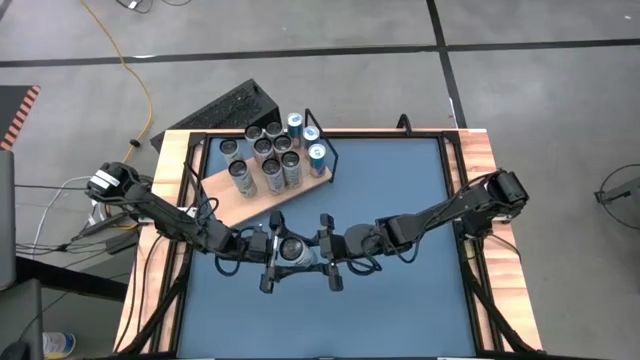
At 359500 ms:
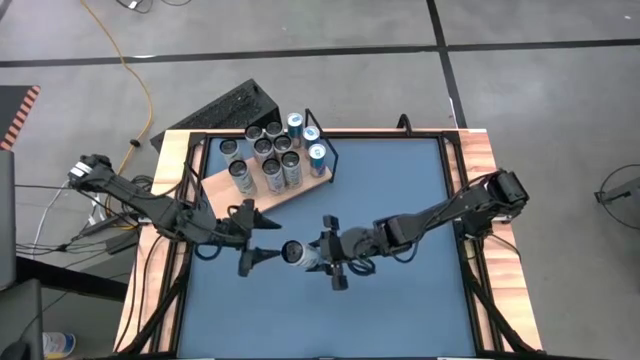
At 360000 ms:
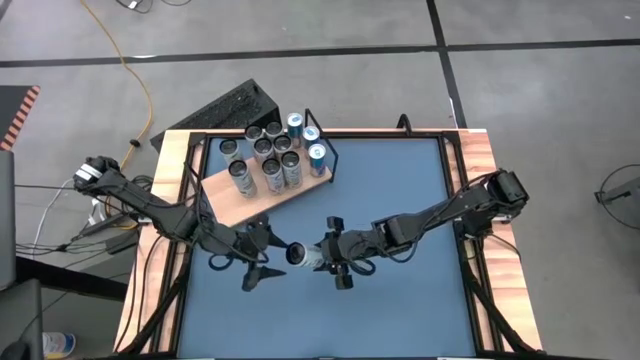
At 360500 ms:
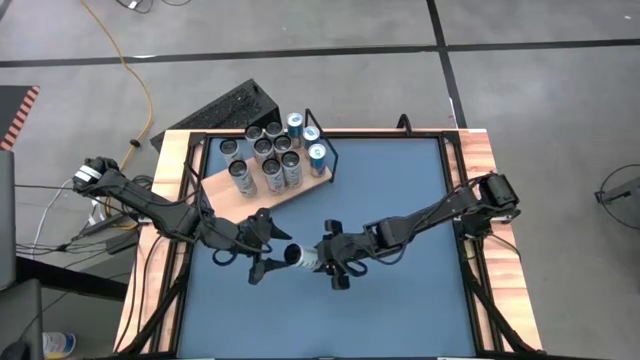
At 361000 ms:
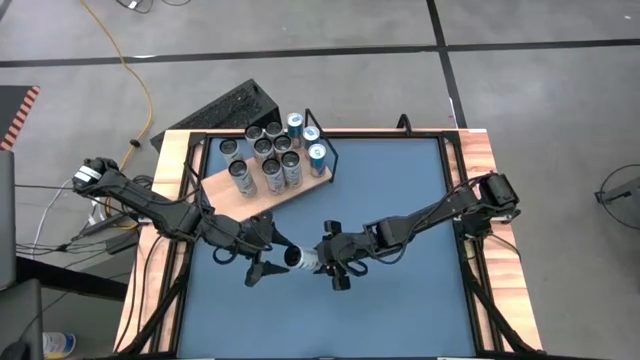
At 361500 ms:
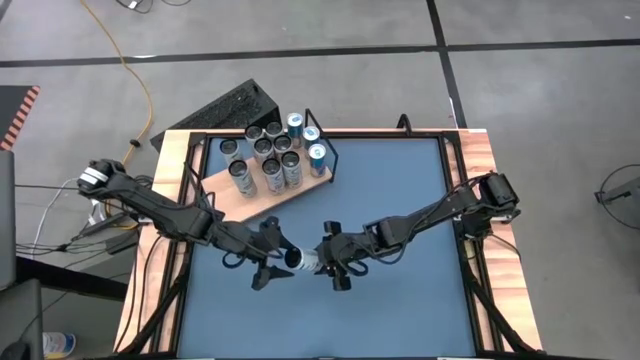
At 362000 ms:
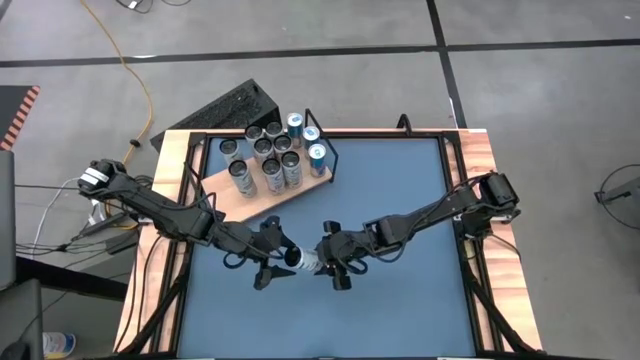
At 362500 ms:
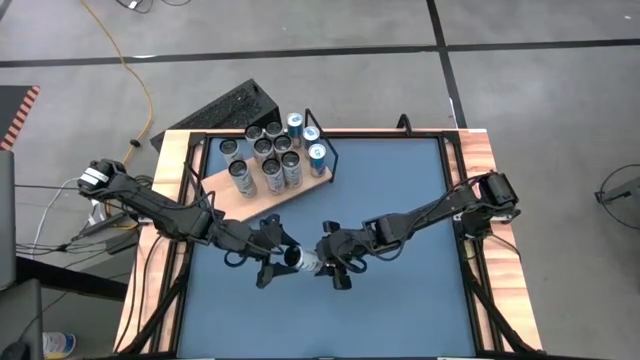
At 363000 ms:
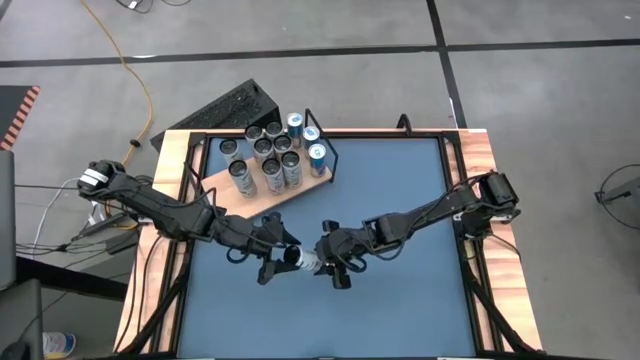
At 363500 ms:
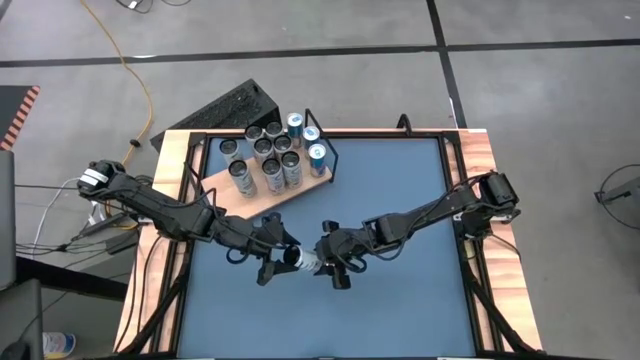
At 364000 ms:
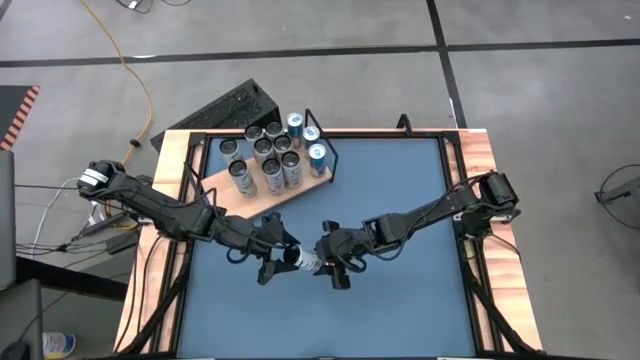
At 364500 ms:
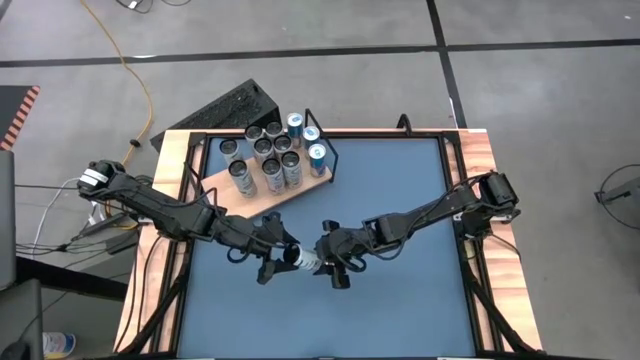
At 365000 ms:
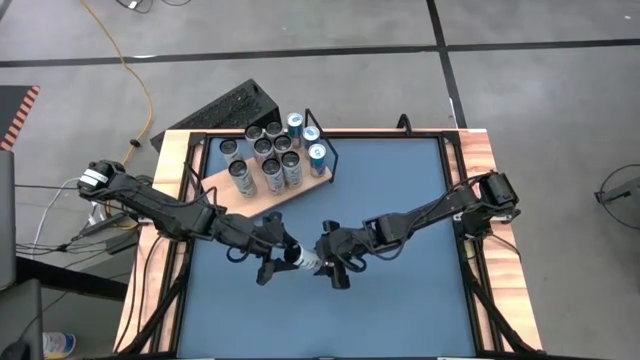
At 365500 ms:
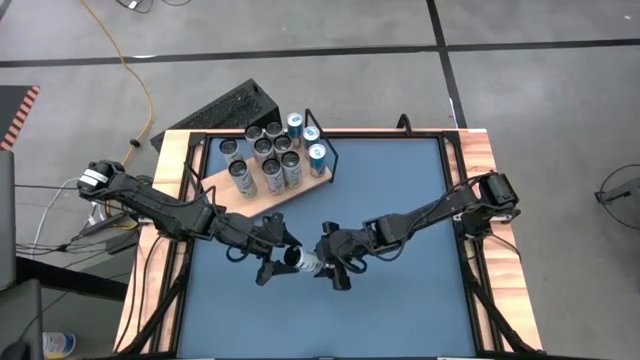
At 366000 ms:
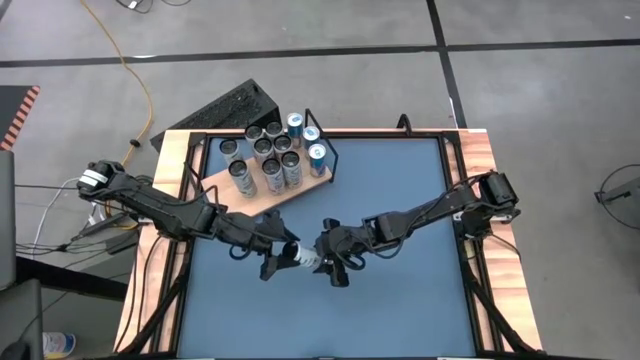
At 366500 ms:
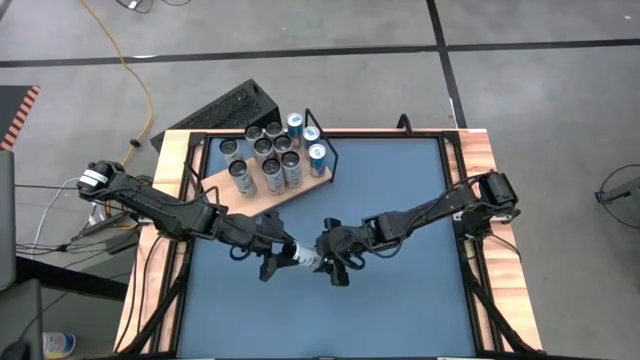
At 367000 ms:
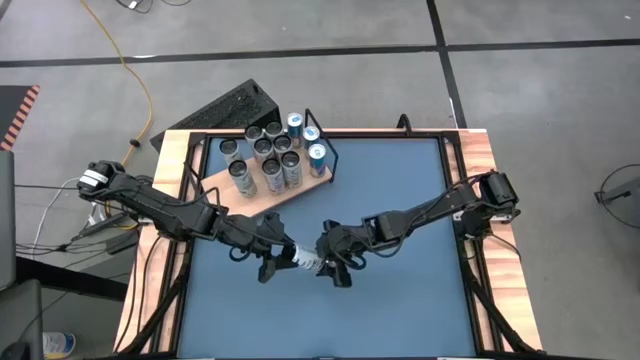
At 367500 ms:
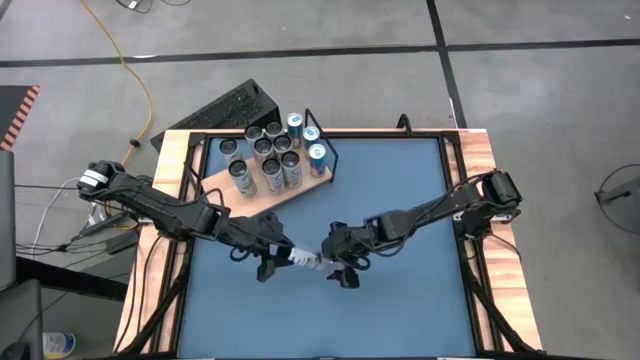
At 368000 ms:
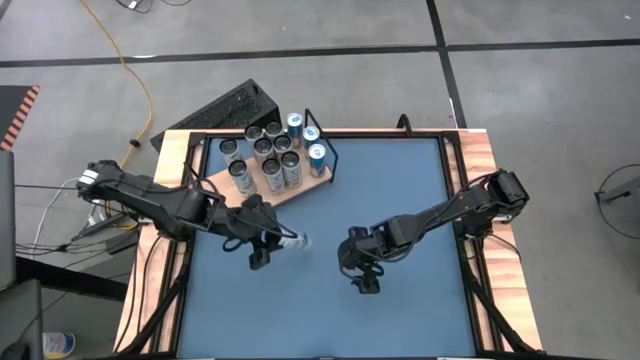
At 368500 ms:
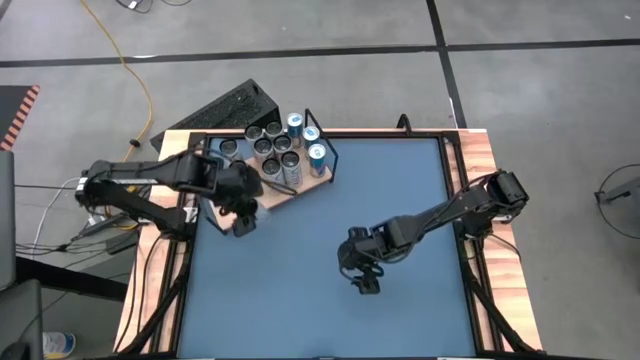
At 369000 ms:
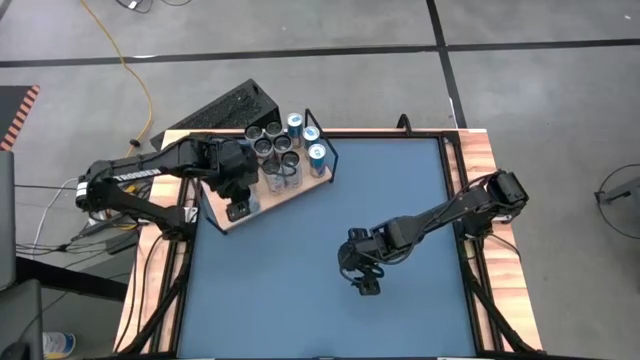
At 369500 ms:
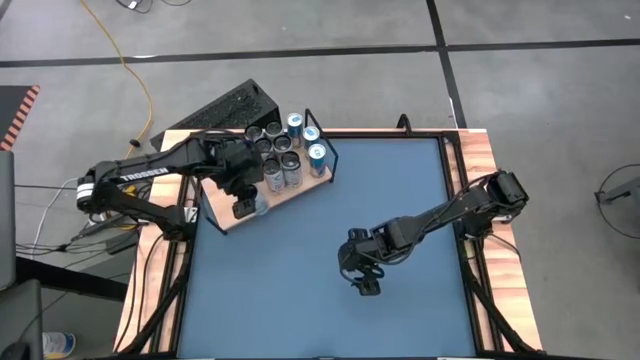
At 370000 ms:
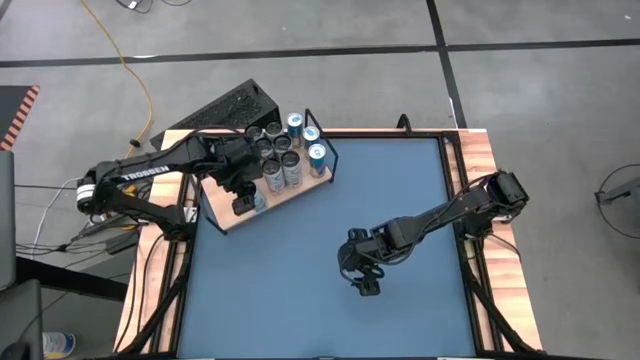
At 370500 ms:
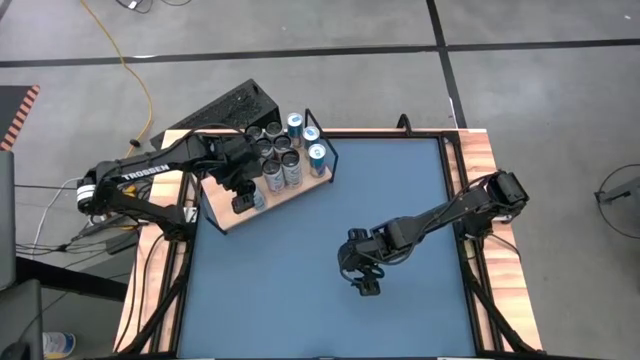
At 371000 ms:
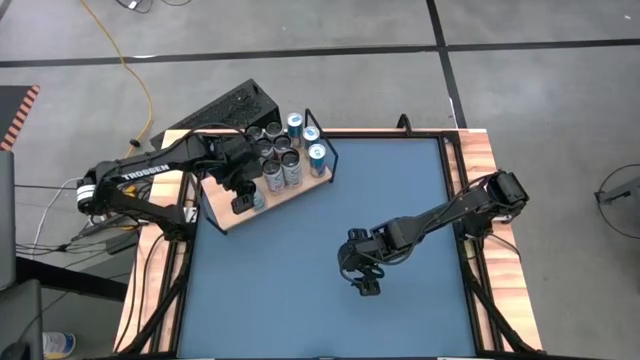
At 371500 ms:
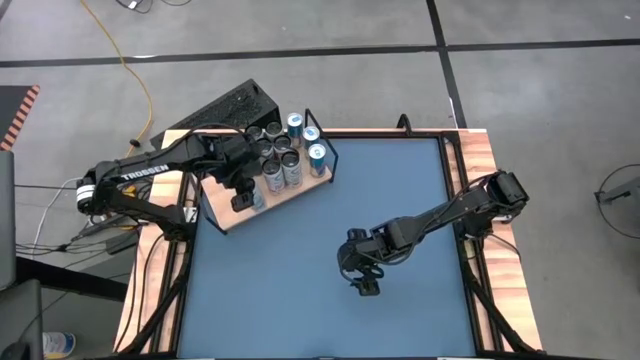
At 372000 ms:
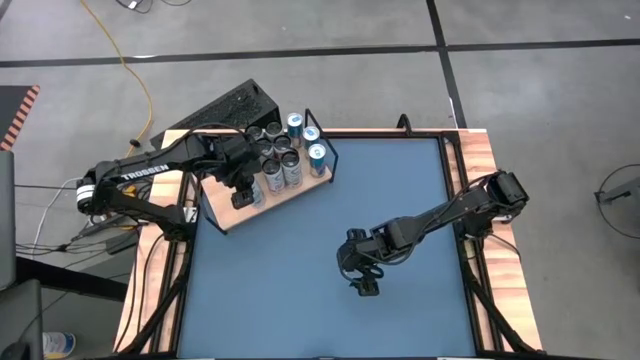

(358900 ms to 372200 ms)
Task: Place canned beverage on shelf
Put the white and blue soda can on the shelf aligned with the other white and blue soda cans

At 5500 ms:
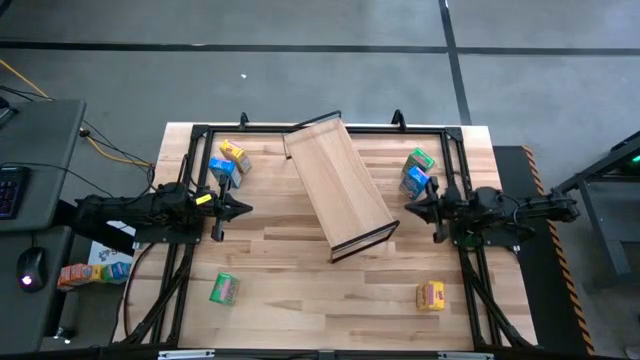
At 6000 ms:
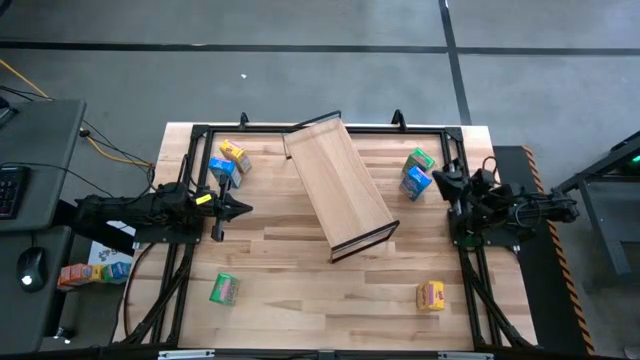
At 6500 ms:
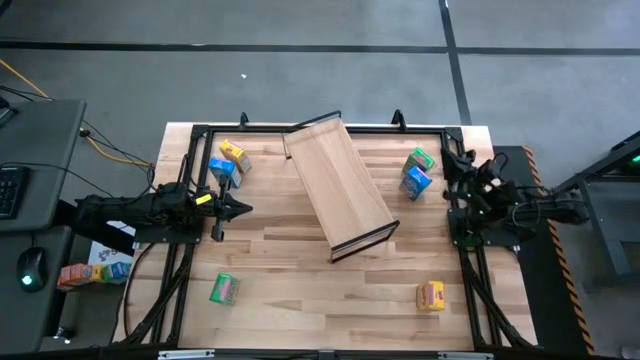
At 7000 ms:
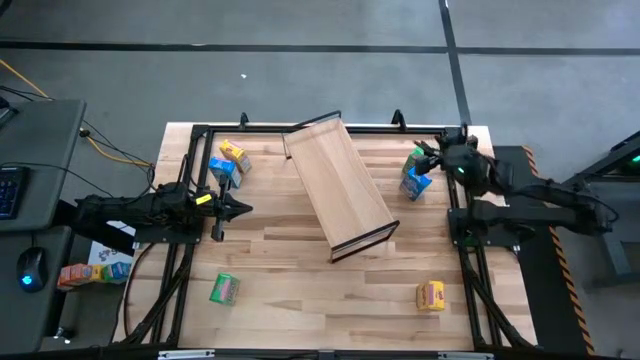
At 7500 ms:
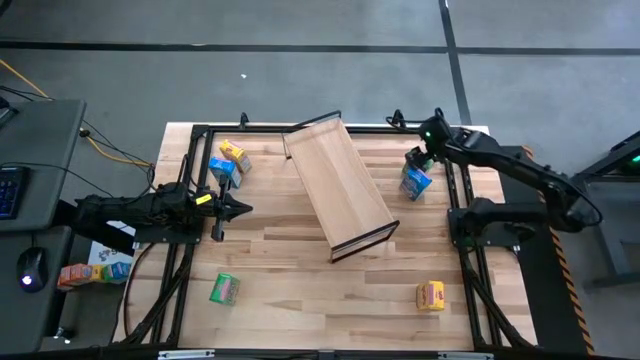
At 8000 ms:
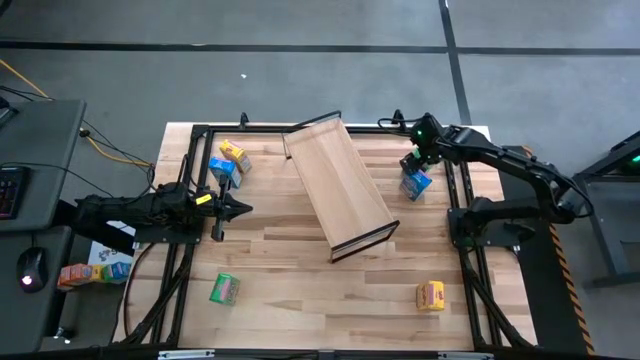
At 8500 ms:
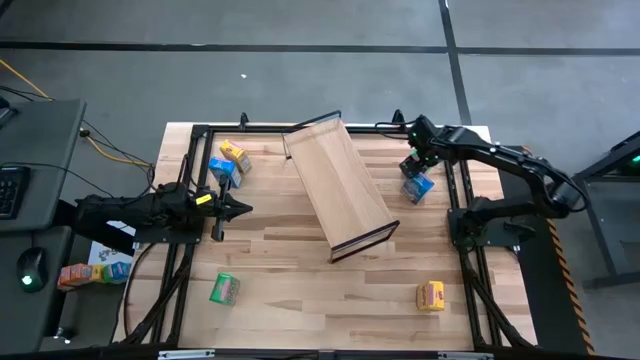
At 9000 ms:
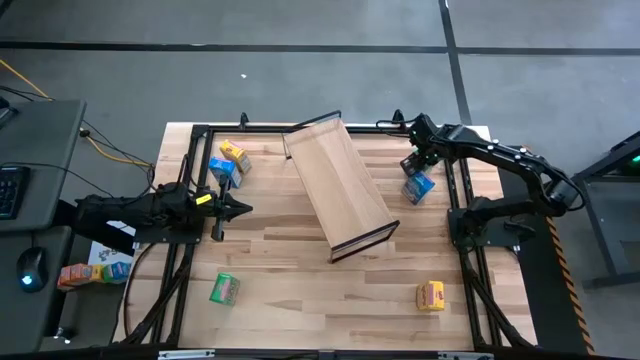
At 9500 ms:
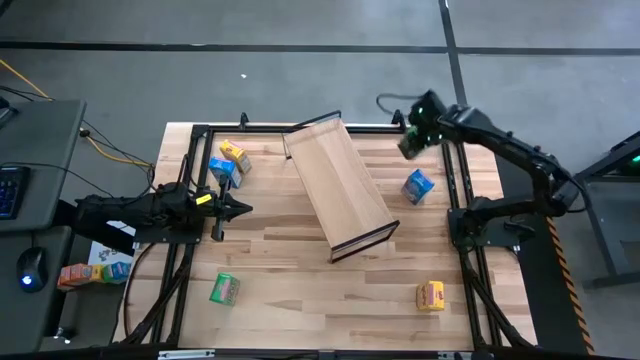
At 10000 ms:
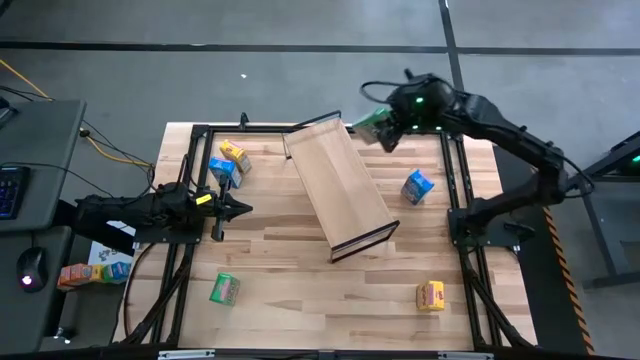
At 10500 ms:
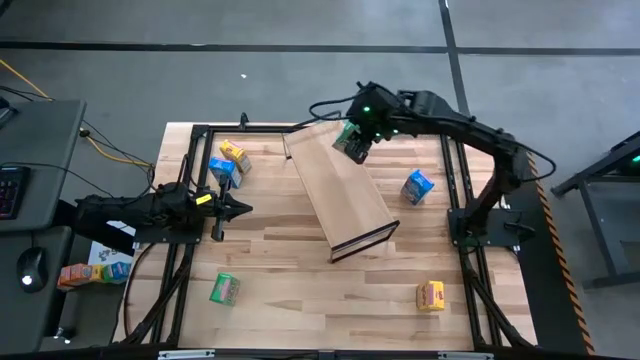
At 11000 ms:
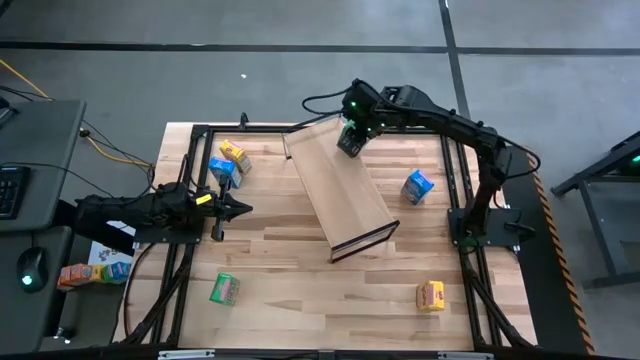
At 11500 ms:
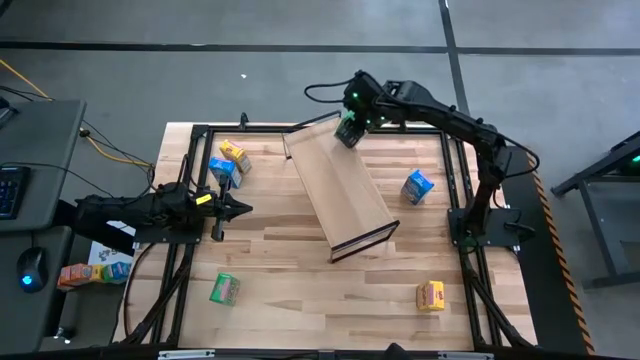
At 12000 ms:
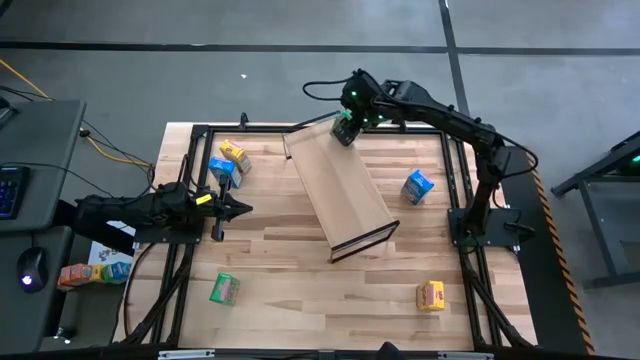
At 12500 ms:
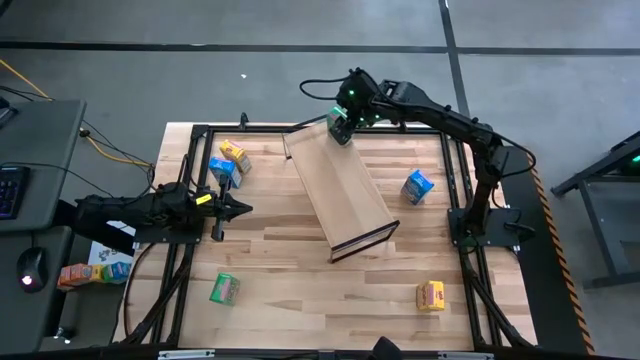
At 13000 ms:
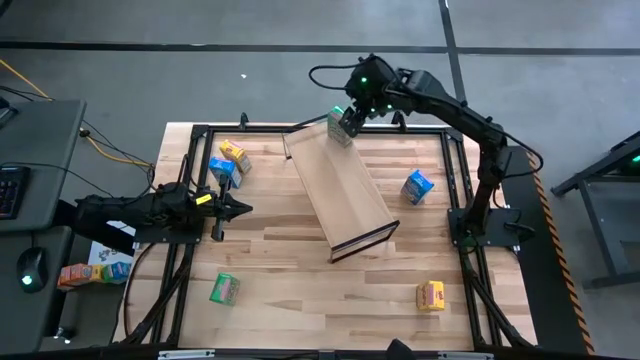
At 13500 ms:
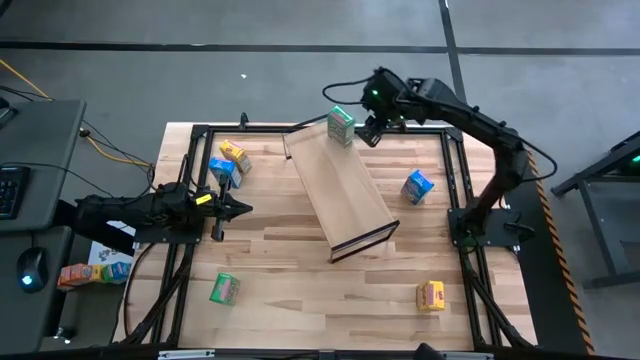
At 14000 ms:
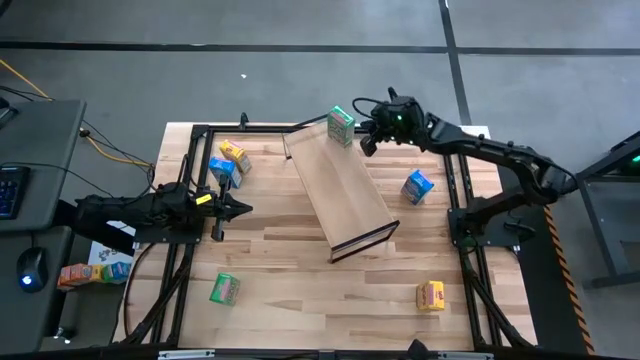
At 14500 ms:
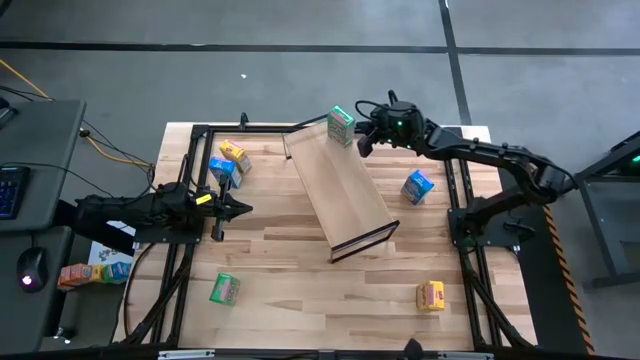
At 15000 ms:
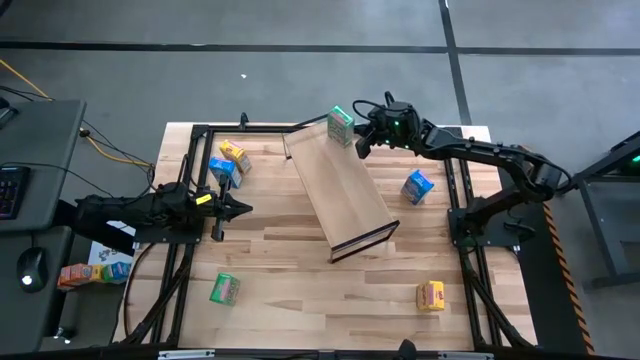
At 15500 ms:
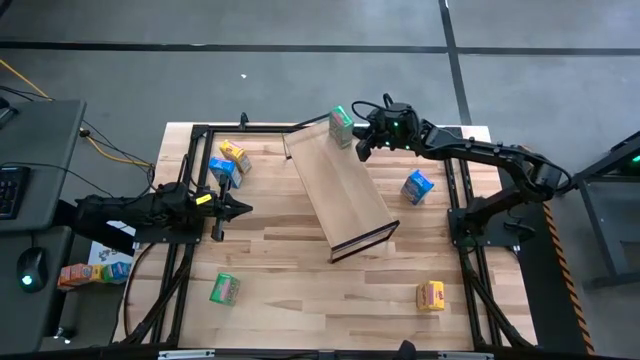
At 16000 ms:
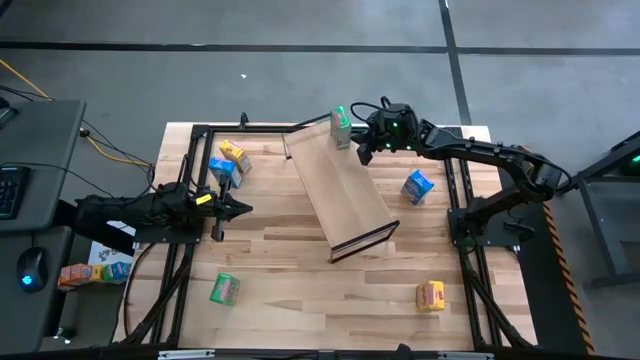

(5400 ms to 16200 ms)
Task: Stack cereal on shelf
Put the top green cereal box on the shelf
